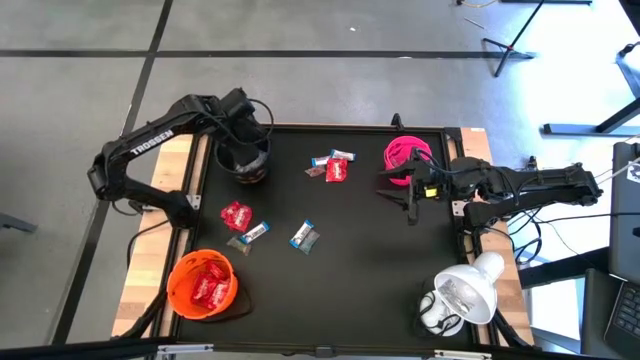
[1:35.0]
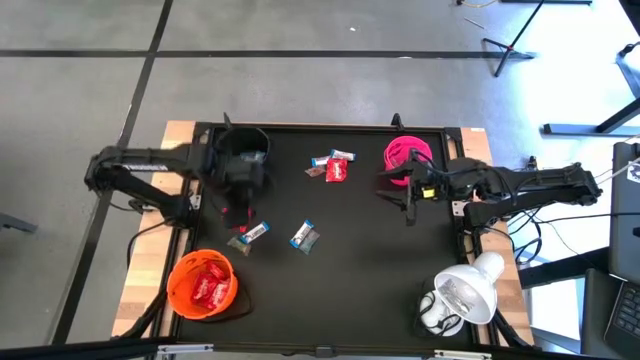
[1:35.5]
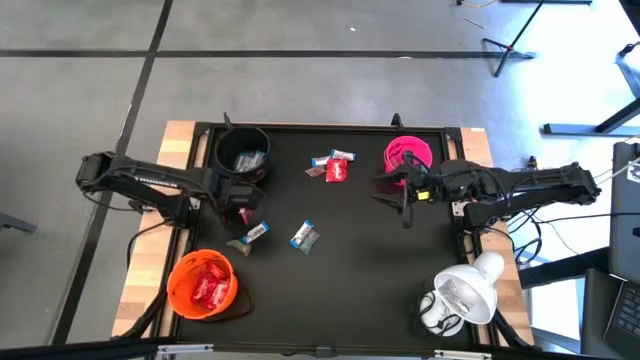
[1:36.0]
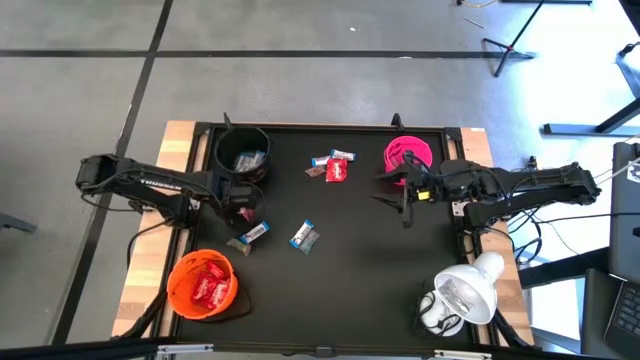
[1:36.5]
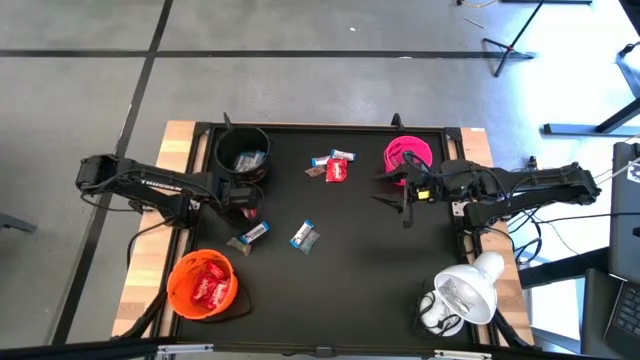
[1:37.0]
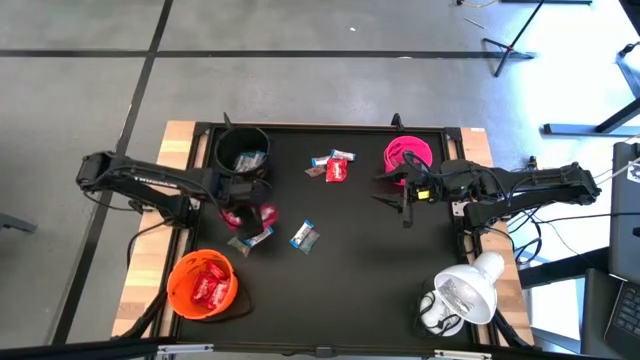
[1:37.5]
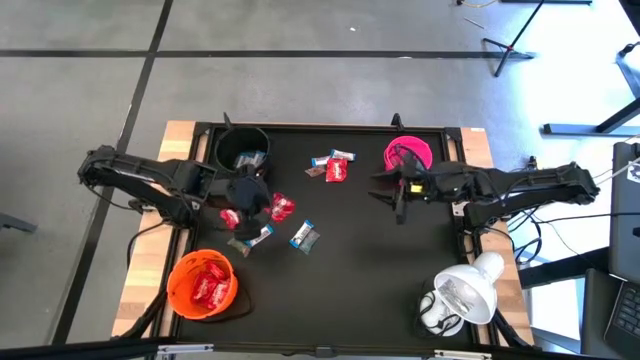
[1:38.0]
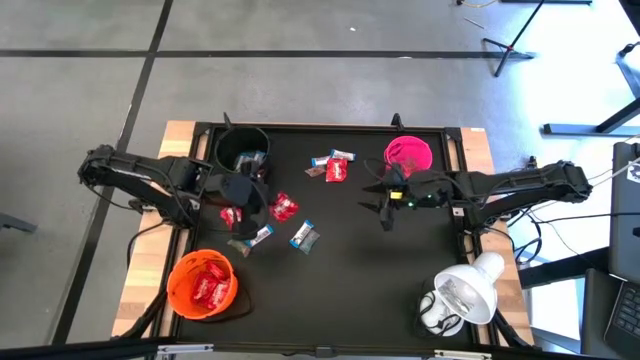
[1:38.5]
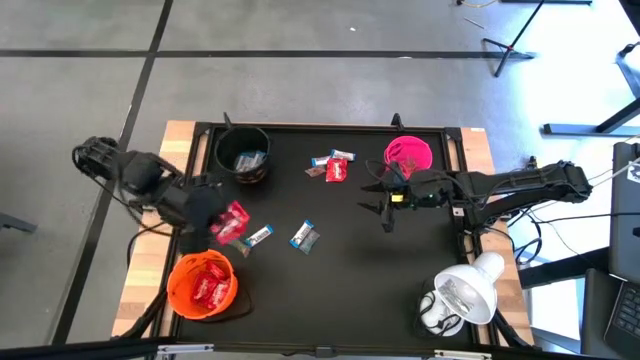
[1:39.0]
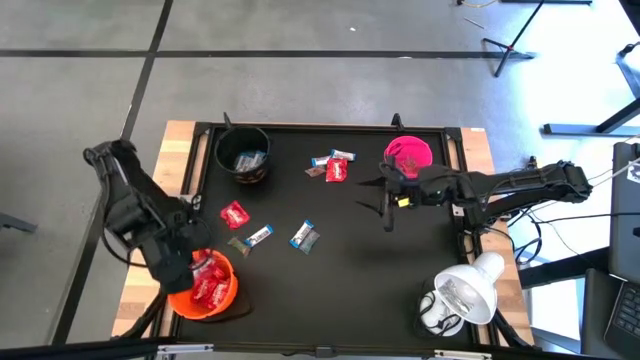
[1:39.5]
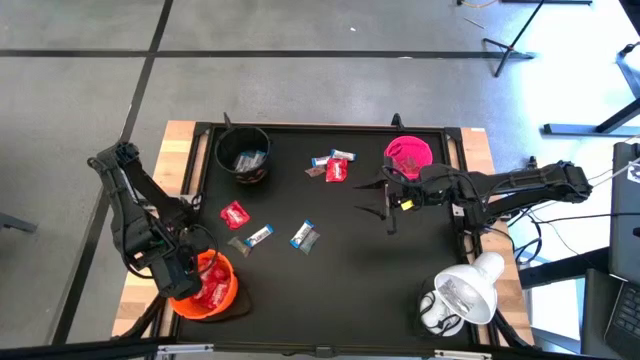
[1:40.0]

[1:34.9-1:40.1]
Task: Sort candy
Put the red candy into the orange bucket

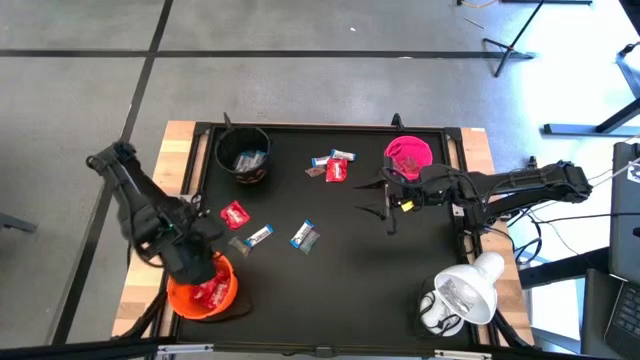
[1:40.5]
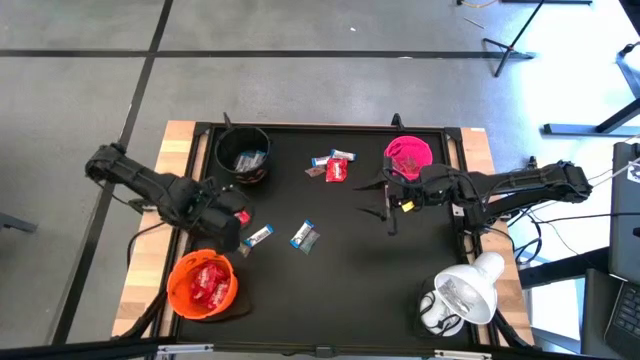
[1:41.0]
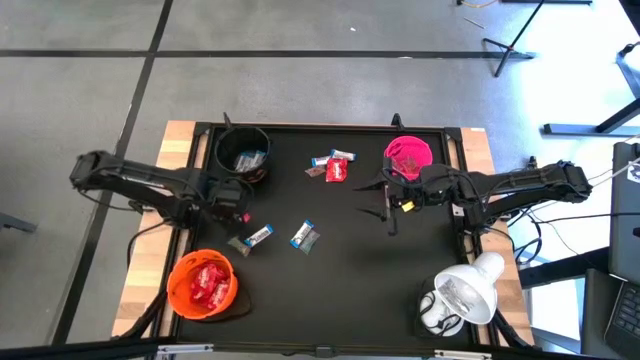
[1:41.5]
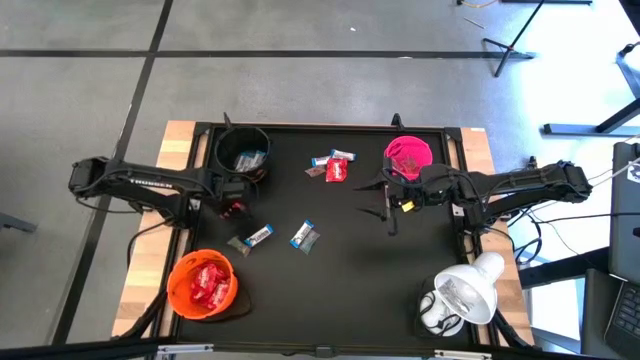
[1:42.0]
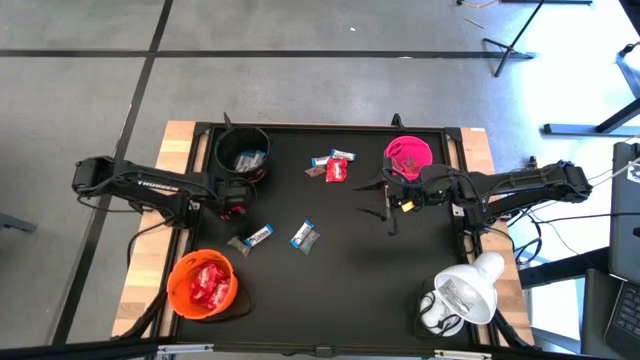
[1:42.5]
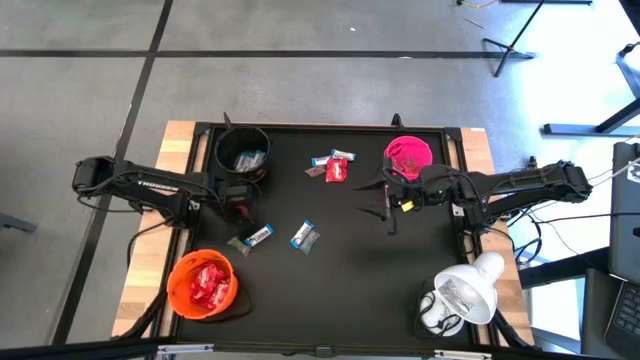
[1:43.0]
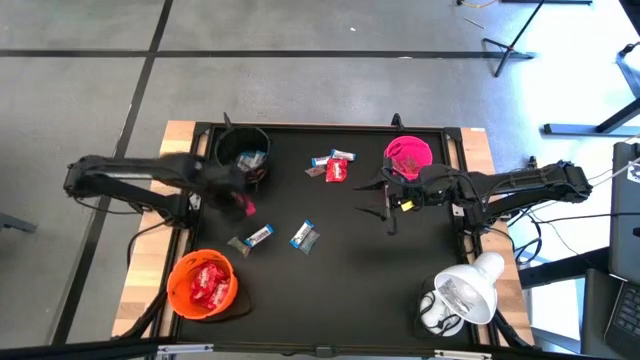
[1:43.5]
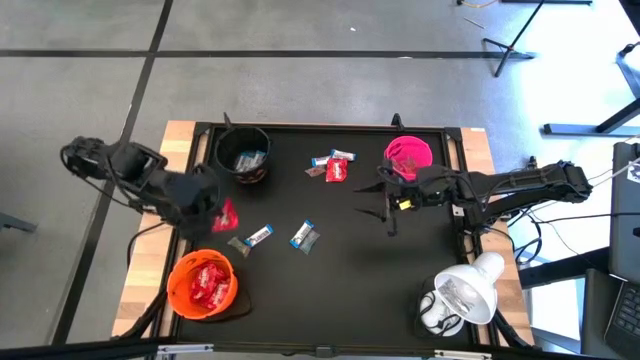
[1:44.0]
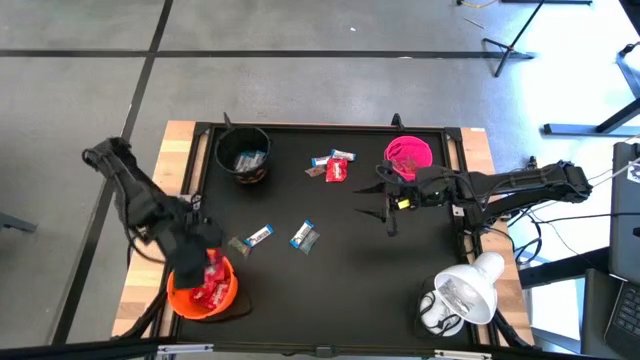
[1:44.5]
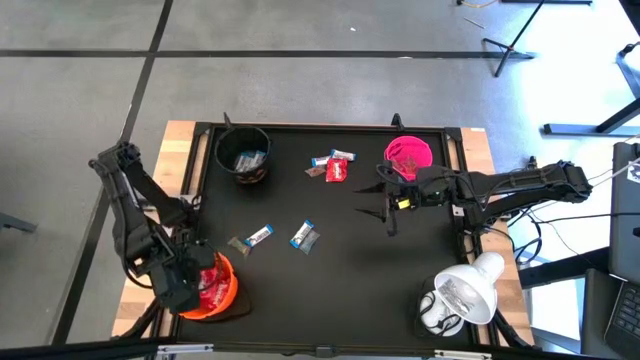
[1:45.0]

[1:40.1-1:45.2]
Put the red candy into the orange bucket

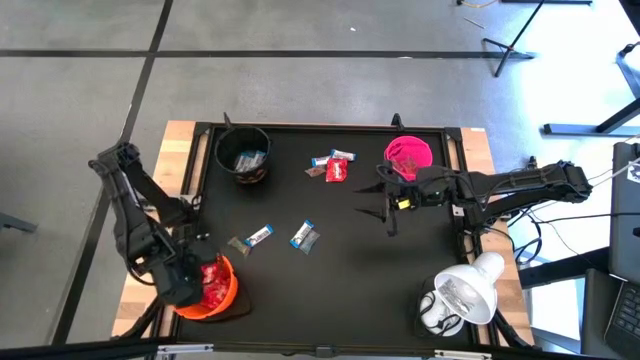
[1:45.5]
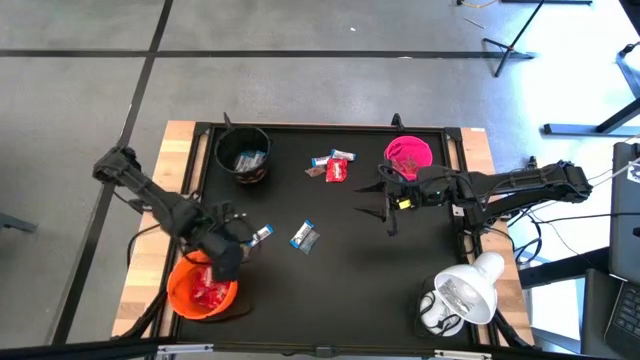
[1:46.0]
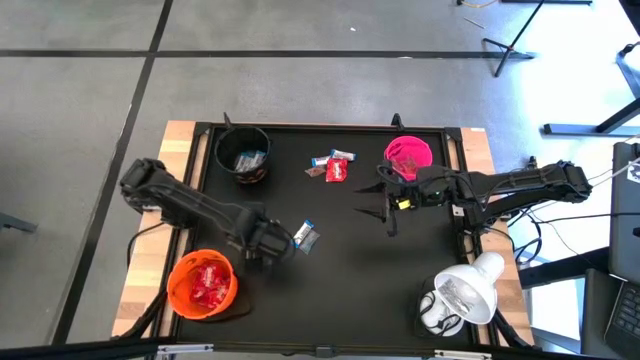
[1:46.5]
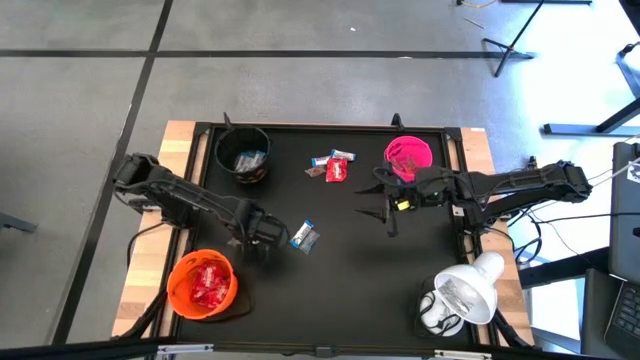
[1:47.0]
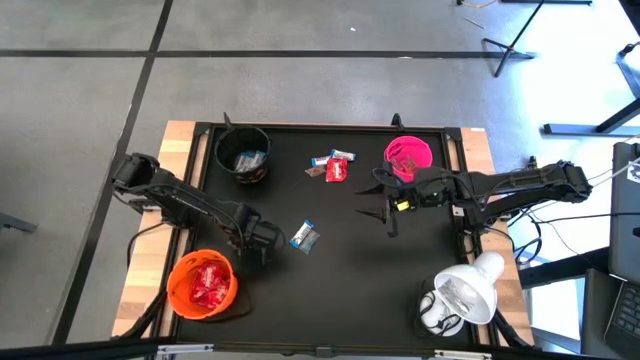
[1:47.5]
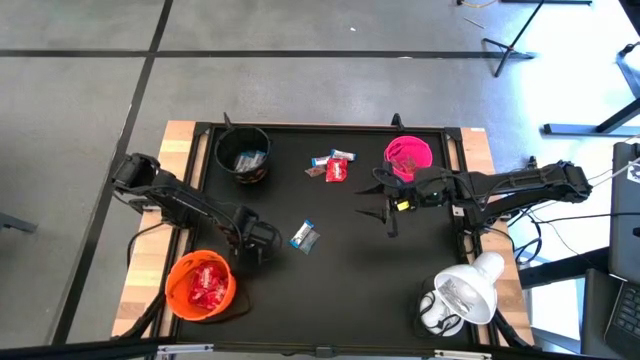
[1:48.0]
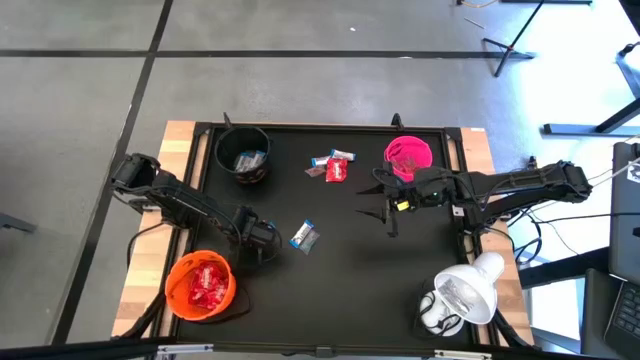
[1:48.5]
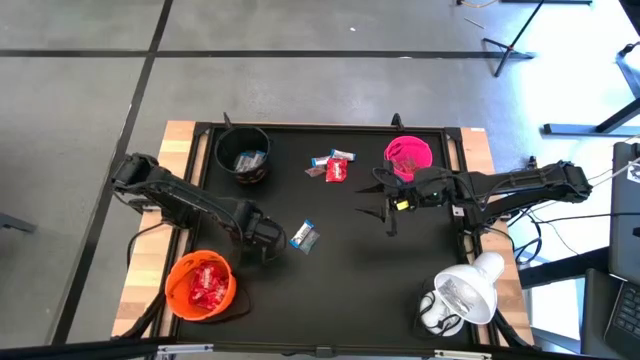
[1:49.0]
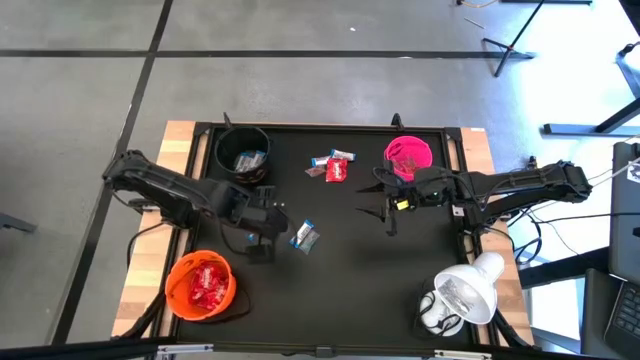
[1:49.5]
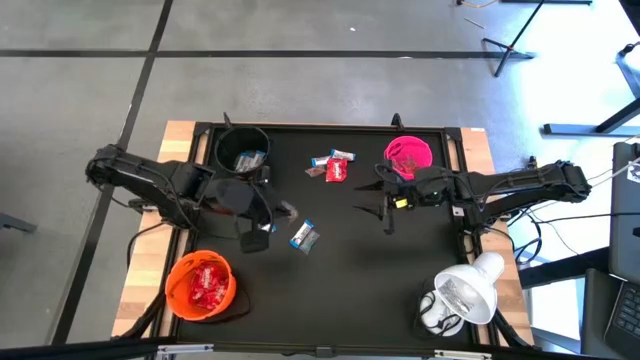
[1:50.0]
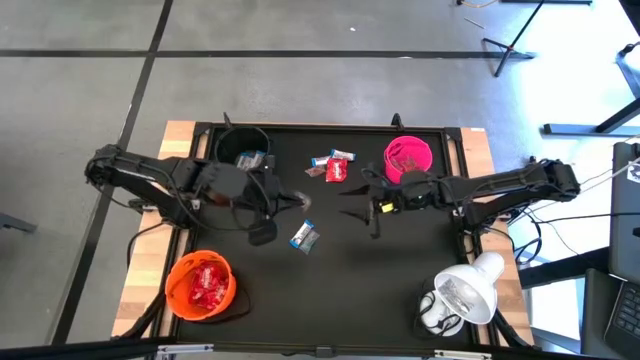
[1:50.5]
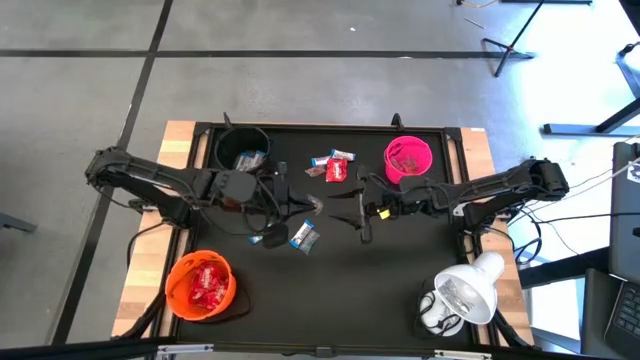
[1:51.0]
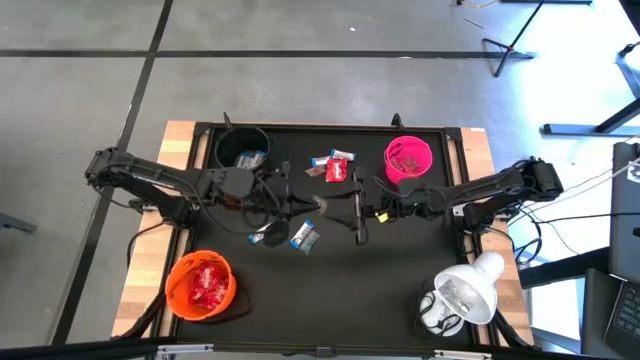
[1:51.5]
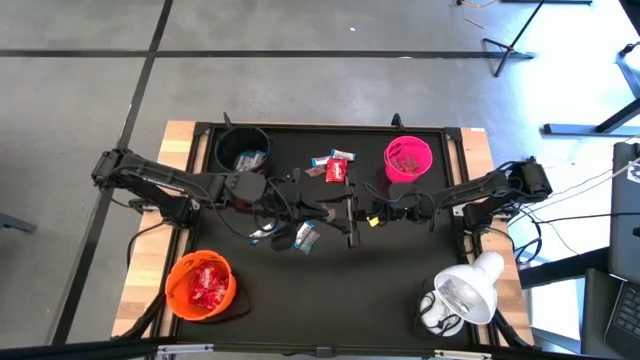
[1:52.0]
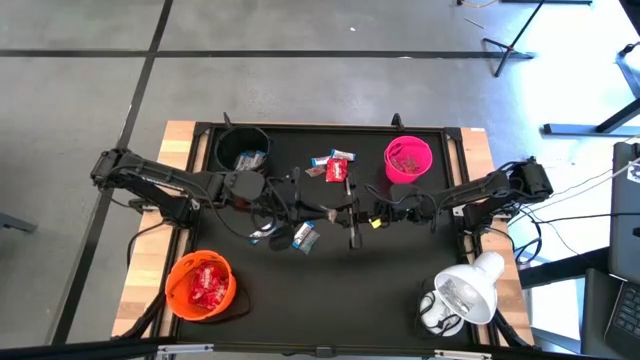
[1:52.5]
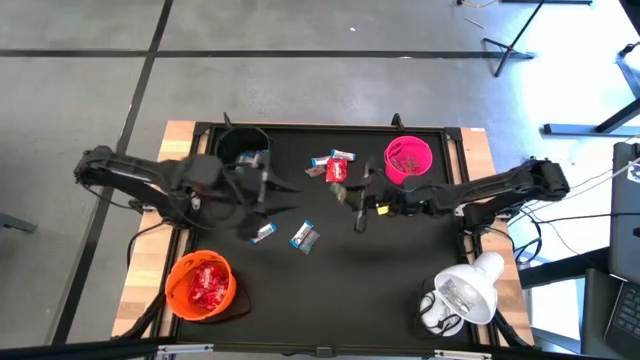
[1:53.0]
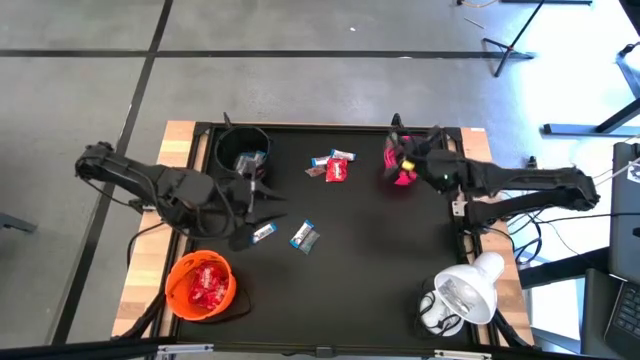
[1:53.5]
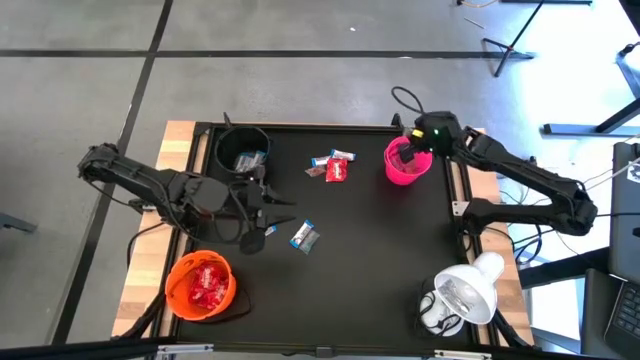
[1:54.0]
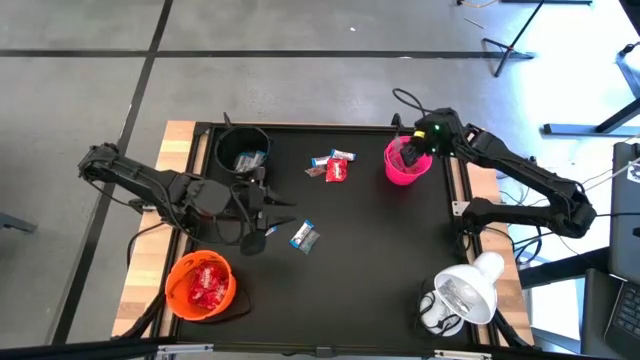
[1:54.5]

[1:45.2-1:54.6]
Put the green gummy into the pink bucket

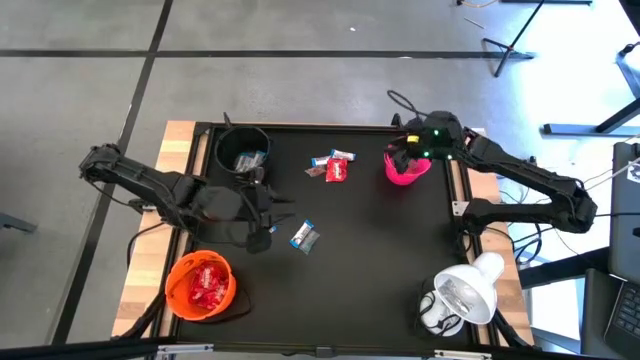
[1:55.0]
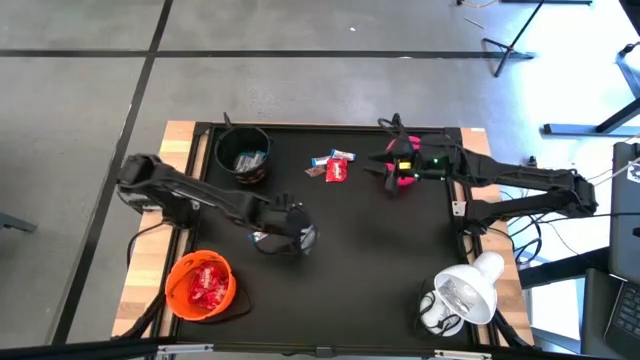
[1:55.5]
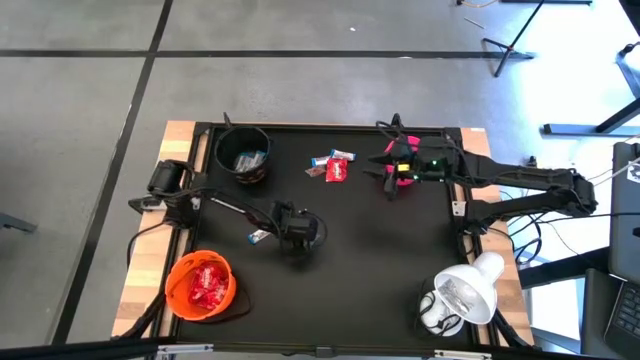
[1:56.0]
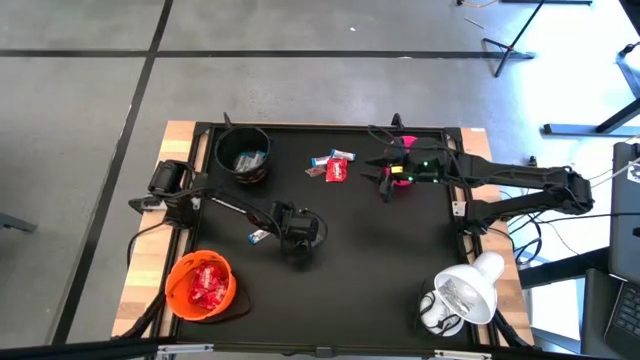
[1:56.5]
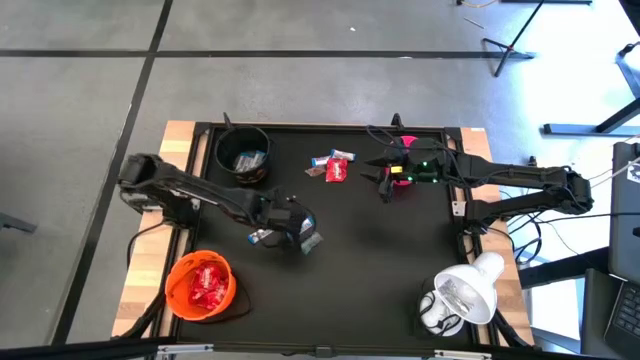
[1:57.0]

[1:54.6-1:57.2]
Put the white chocolate bar into the black bucket
